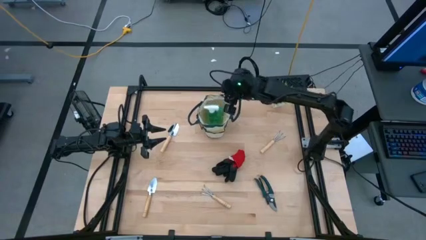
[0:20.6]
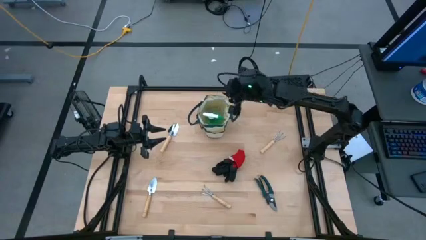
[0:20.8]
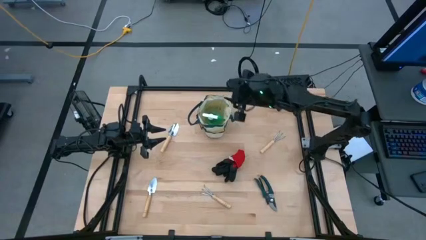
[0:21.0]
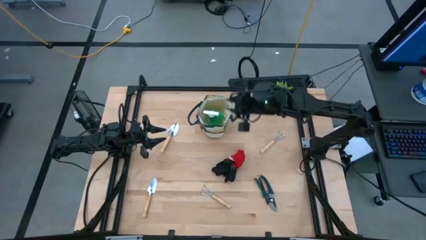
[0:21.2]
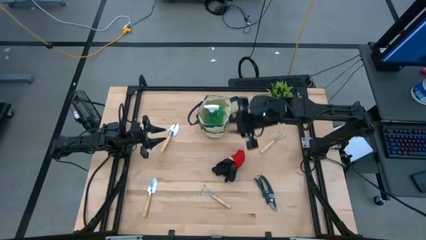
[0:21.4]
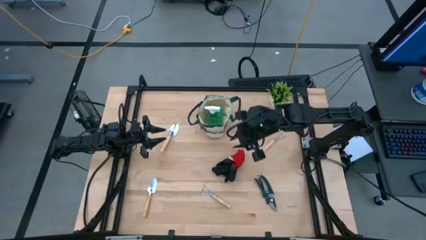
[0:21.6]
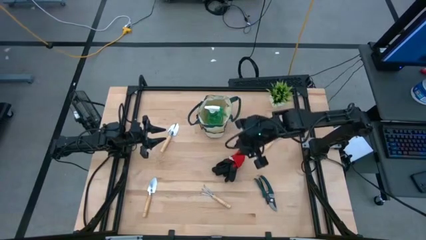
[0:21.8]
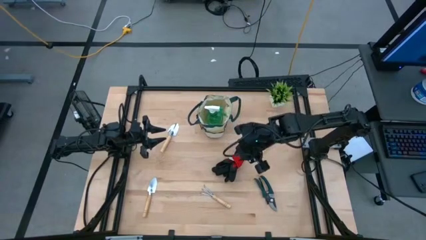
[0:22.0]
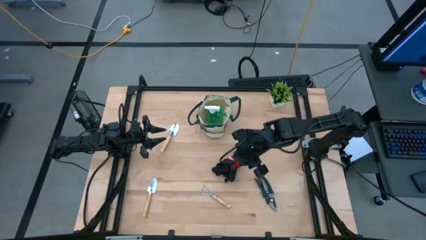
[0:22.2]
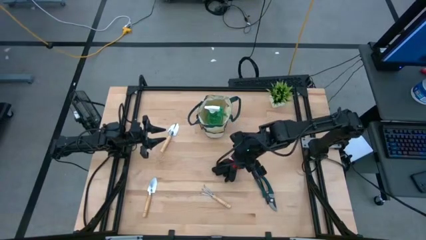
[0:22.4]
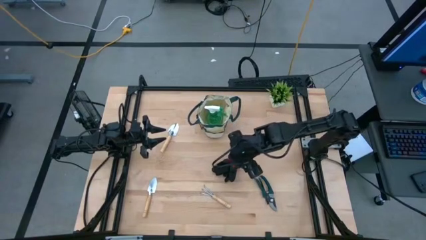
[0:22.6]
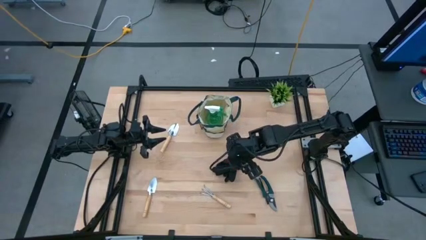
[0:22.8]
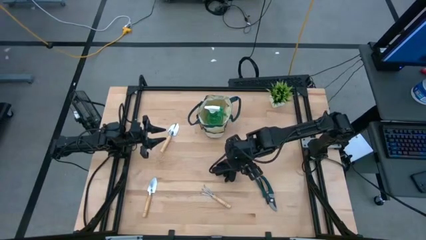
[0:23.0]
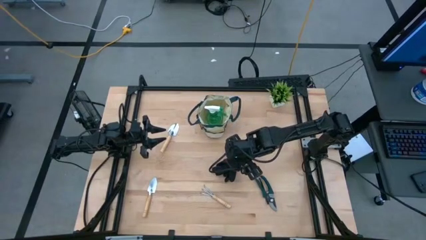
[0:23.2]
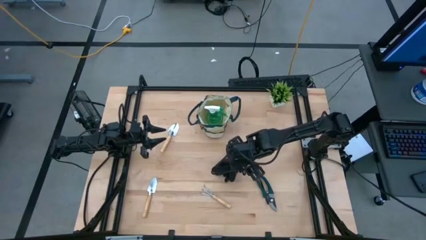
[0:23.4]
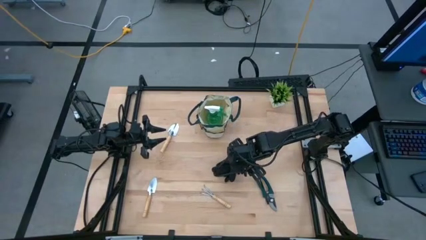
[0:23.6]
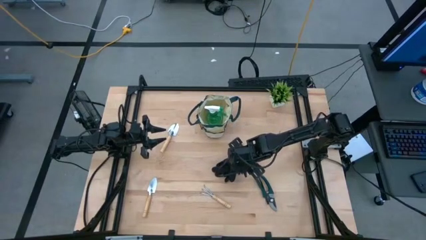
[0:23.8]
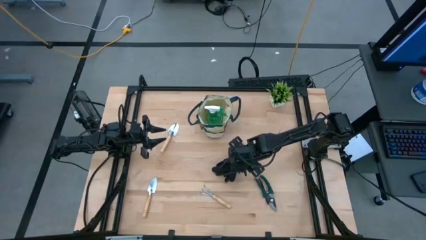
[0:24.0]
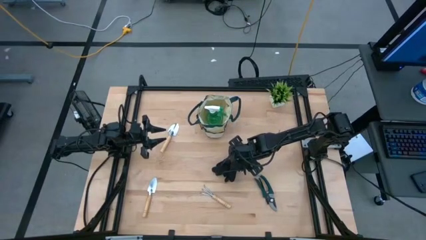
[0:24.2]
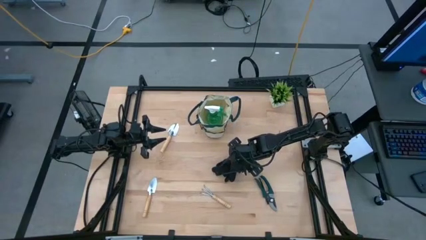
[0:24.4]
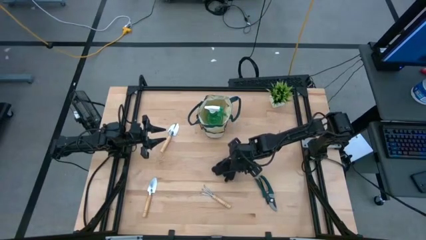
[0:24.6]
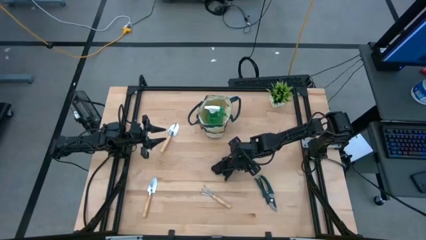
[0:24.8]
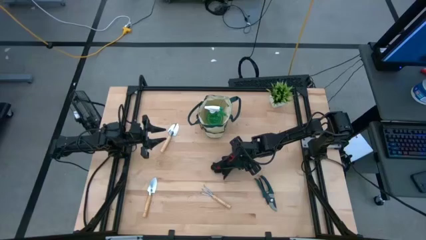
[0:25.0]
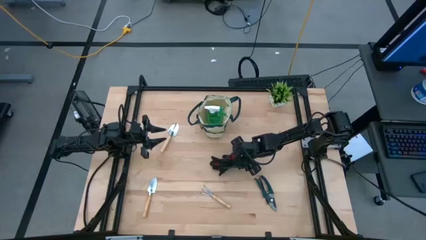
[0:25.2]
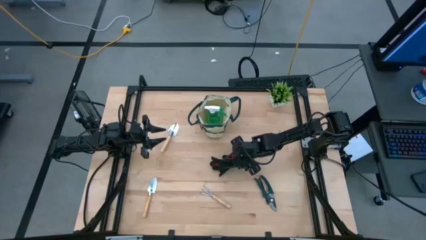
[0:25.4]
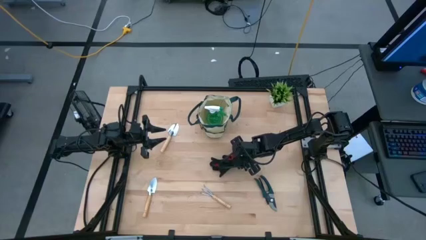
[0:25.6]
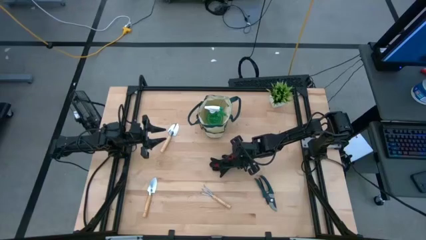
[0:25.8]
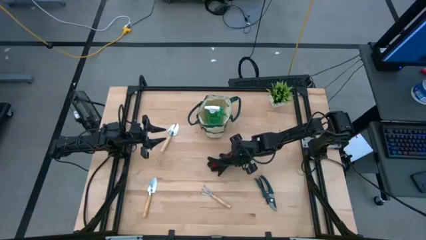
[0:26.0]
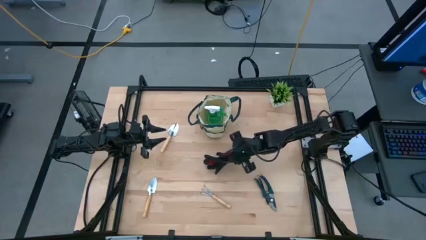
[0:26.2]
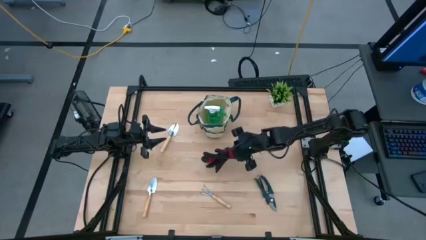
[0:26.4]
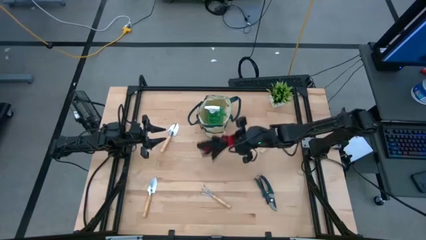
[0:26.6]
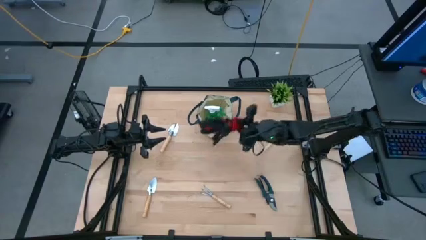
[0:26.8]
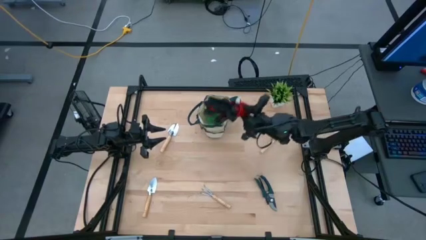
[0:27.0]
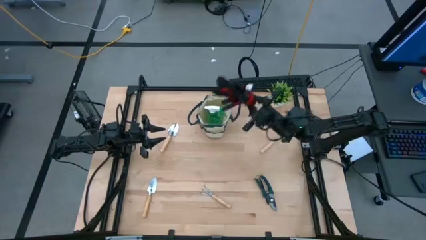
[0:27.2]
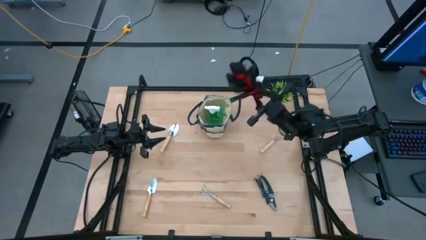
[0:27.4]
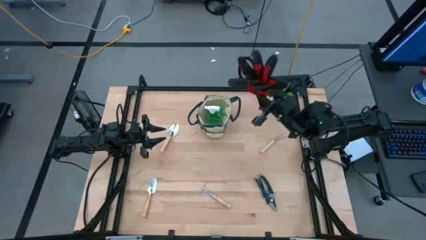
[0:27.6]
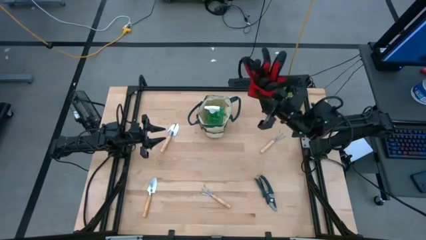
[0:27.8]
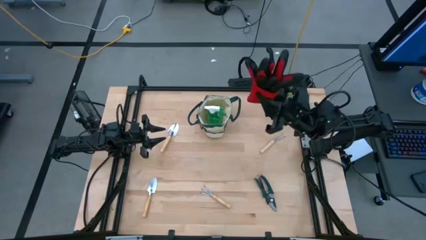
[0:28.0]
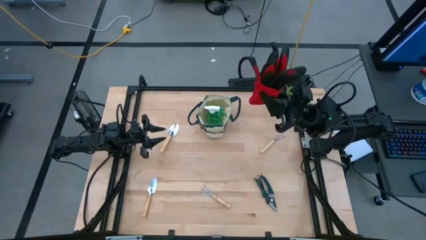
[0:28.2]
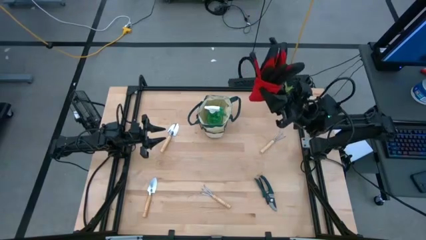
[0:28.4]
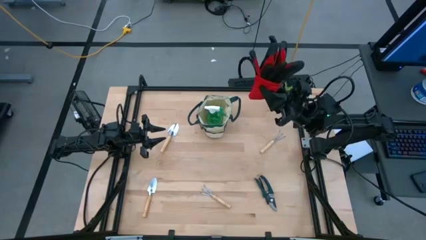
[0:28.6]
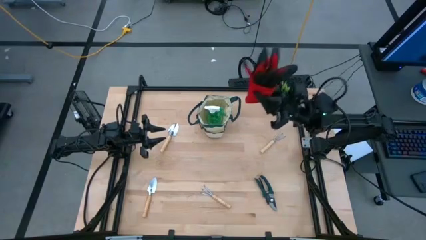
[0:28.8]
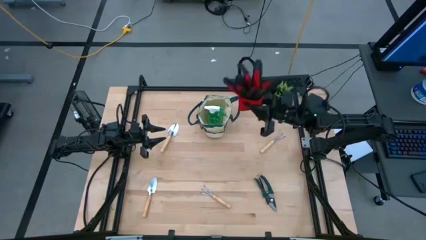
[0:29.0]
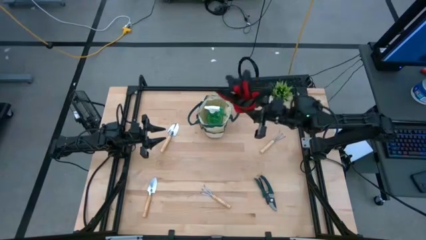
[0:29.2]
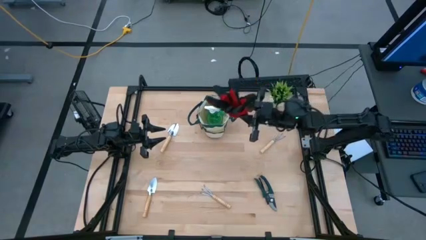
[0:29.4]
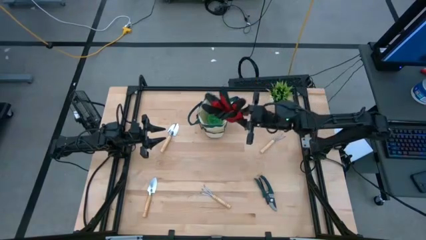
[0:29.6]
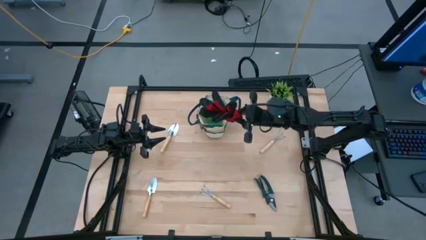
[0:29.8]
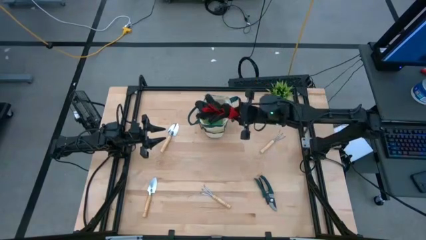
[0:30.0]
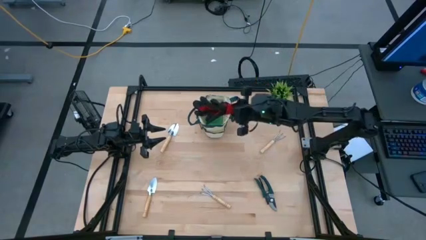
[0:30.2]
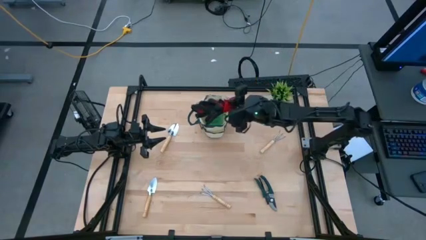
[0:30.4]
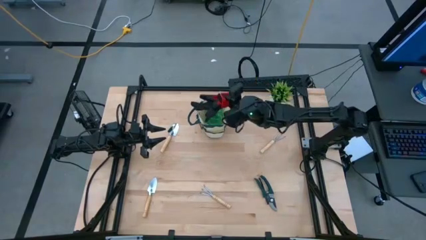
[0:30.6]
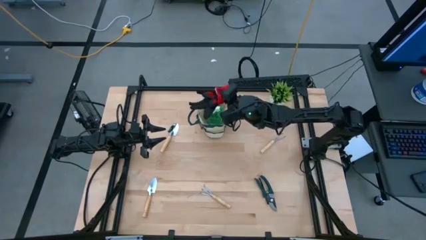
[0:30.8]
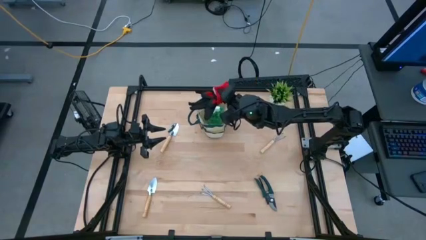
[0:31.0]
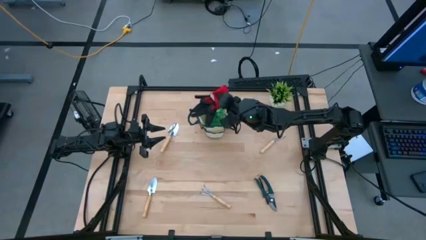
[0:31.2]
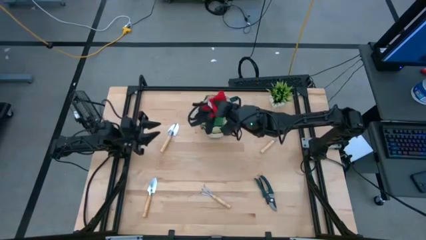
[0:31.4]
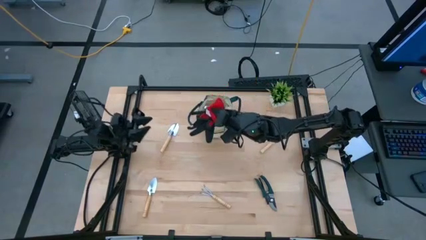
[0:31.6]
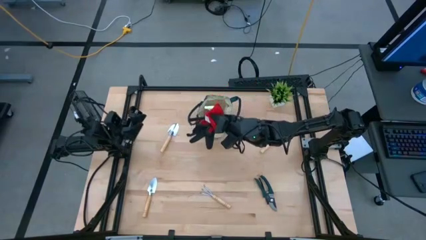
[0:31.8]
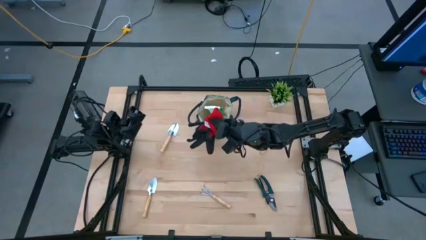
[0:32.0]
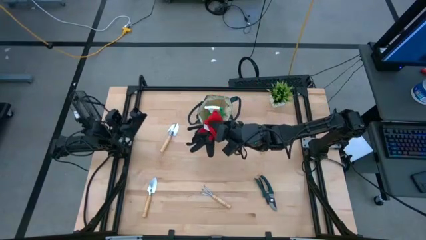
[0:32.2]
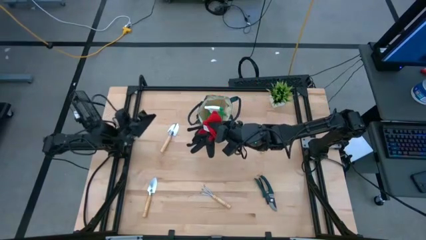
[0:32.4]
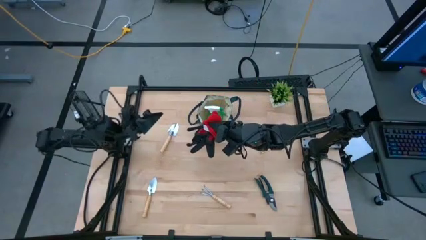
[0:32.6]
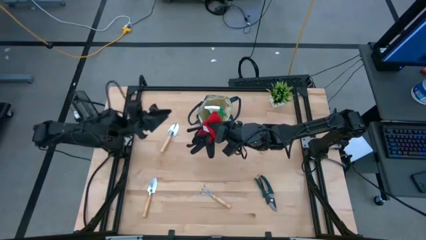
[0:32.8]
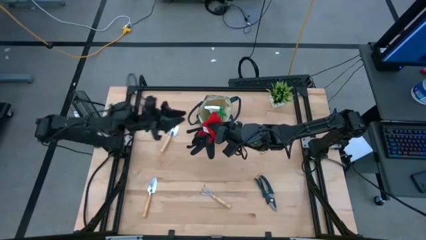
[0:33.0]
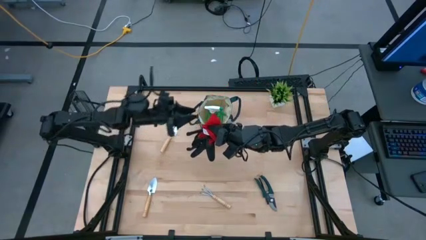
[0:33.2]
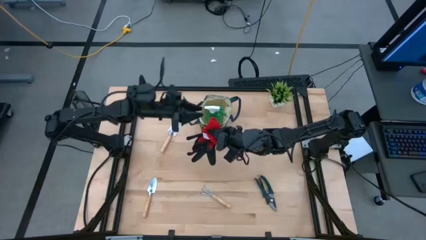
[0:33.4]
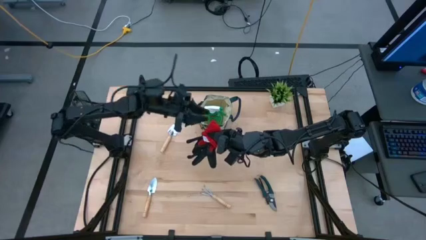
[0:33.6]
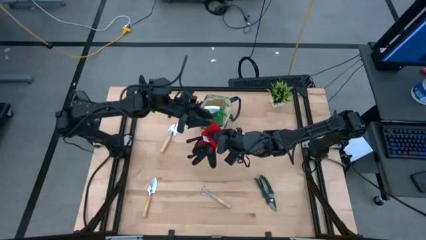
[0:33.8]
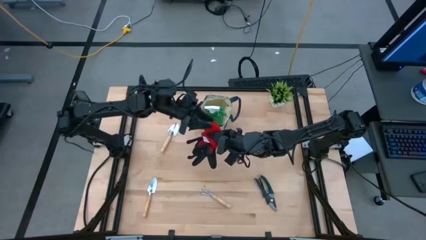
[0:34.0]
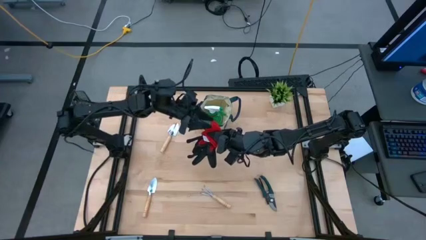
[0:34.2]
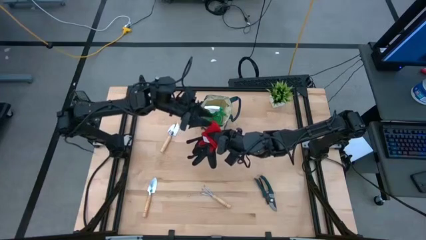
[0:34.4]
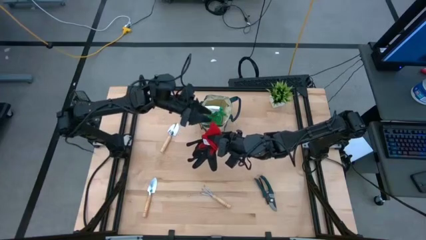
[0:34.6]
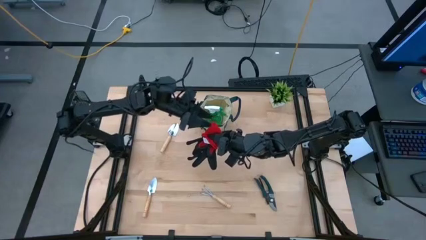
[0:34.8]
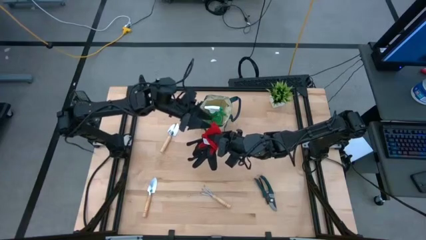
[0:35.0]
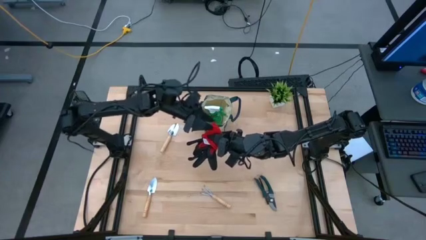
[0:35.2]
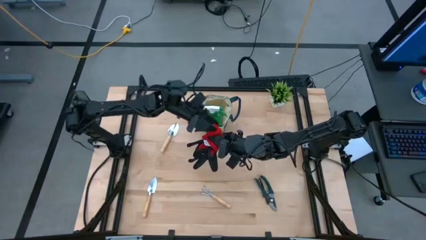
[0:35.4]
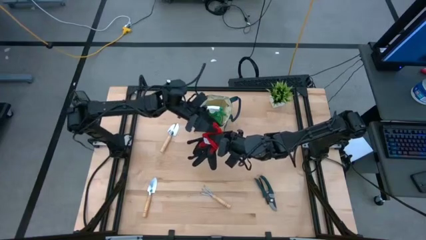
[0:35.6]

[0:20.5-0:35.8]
Task: Pick & Place Garden tools in Gardening bag
Put the red and black gloves into the gardening bag
